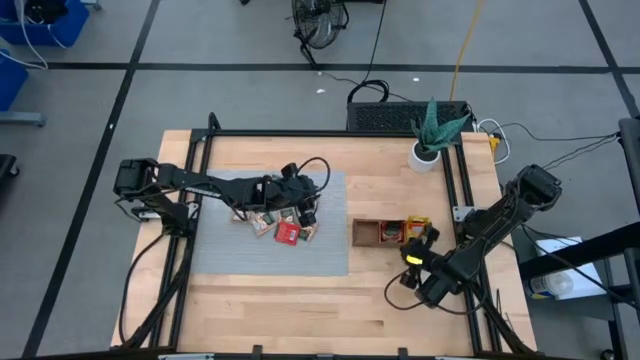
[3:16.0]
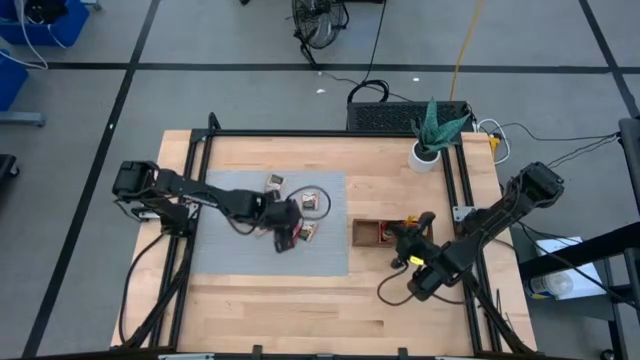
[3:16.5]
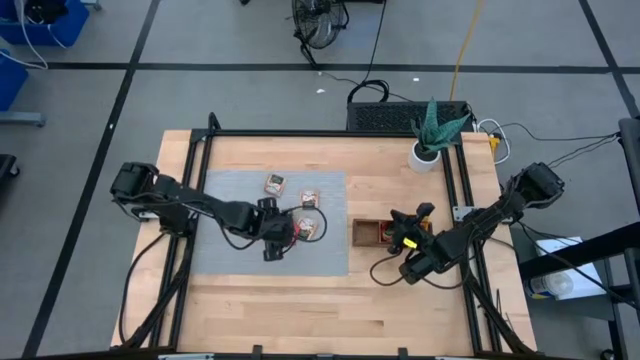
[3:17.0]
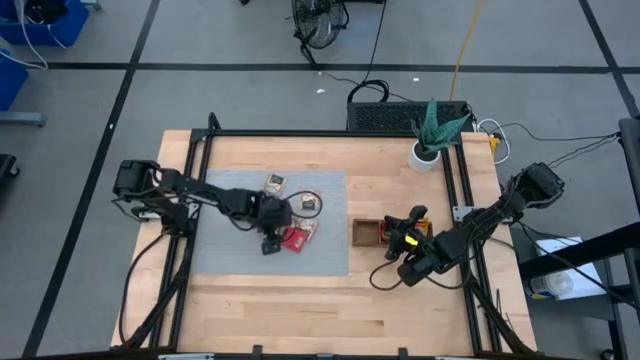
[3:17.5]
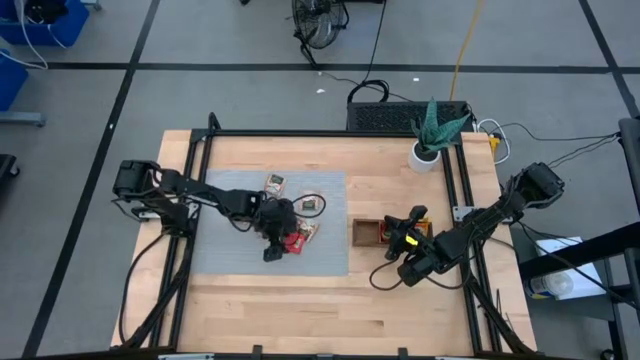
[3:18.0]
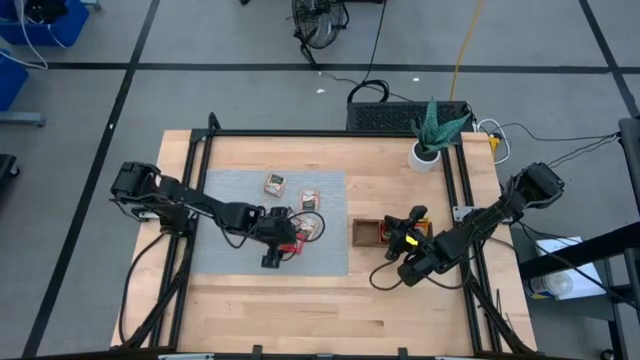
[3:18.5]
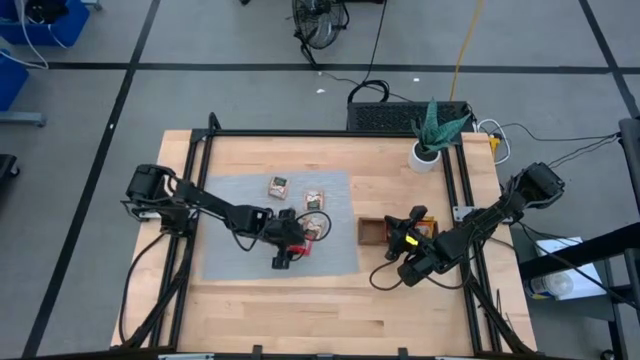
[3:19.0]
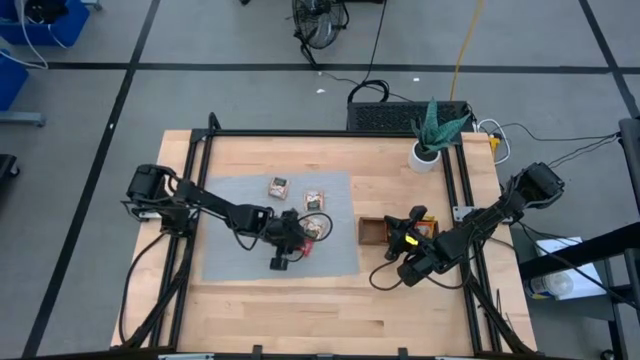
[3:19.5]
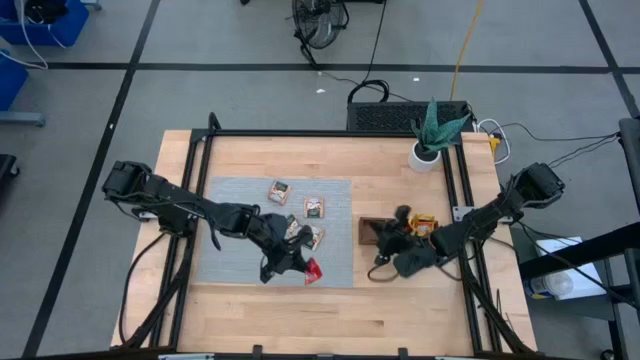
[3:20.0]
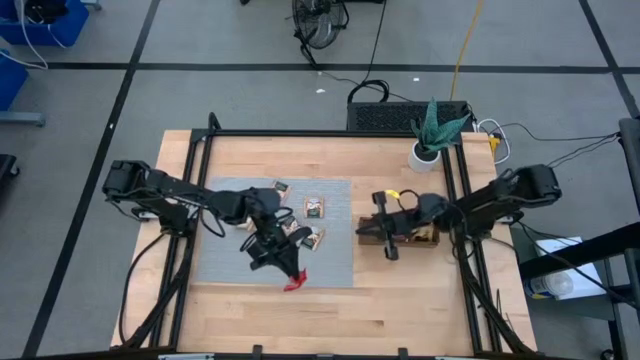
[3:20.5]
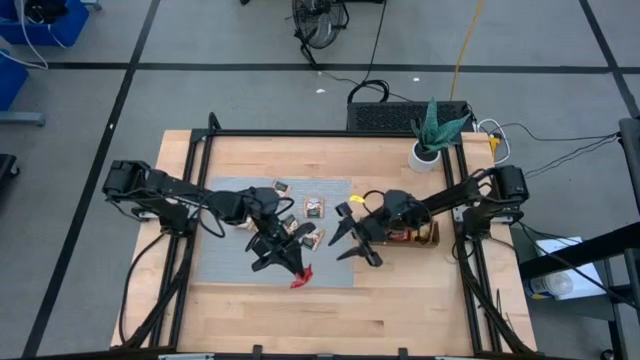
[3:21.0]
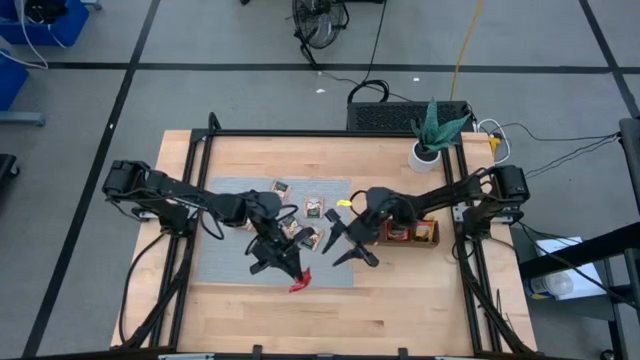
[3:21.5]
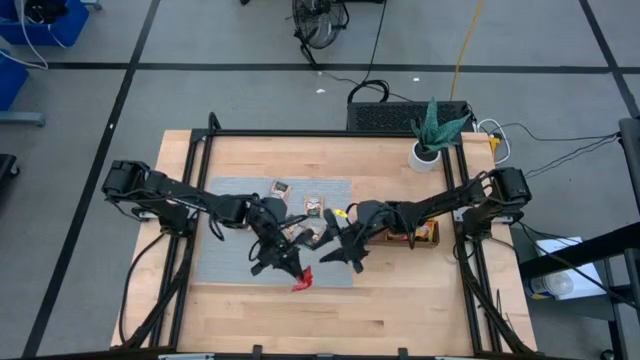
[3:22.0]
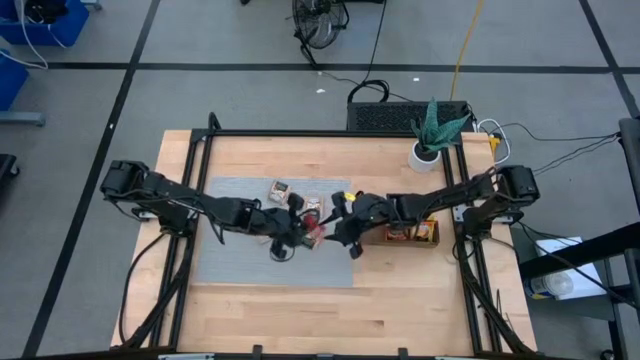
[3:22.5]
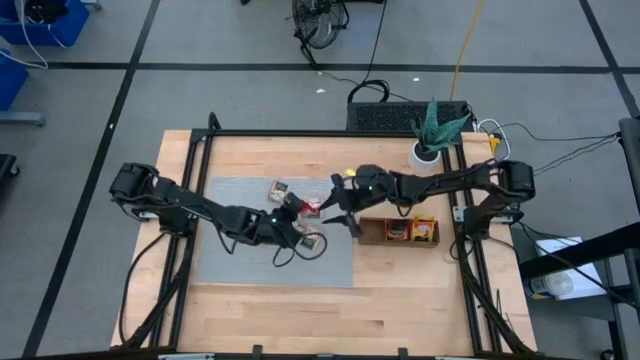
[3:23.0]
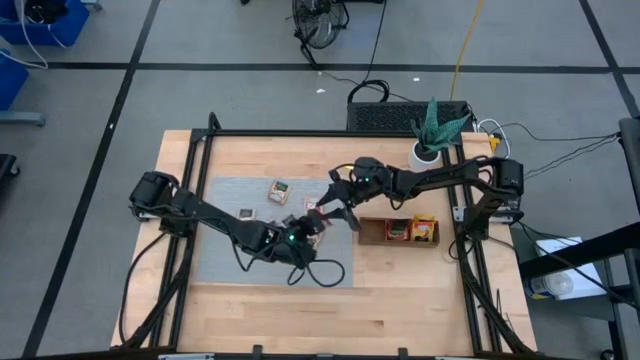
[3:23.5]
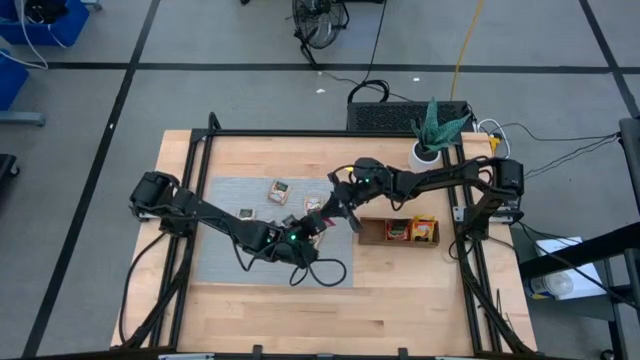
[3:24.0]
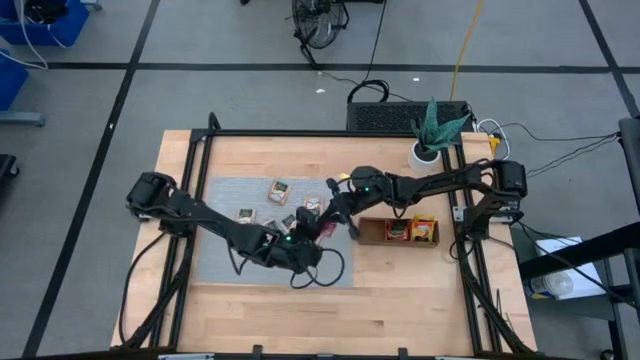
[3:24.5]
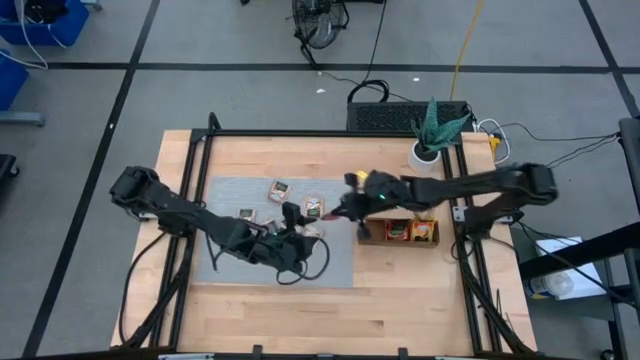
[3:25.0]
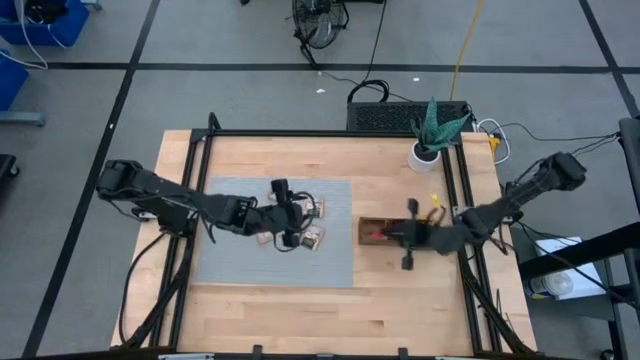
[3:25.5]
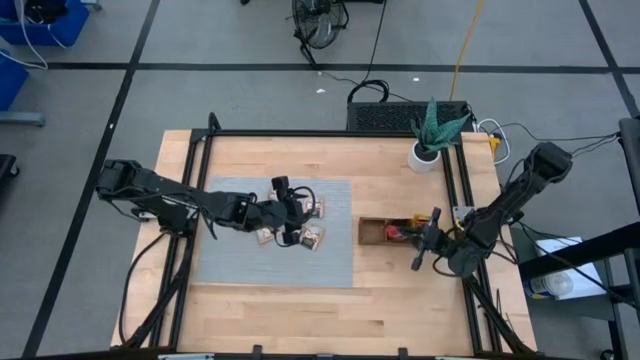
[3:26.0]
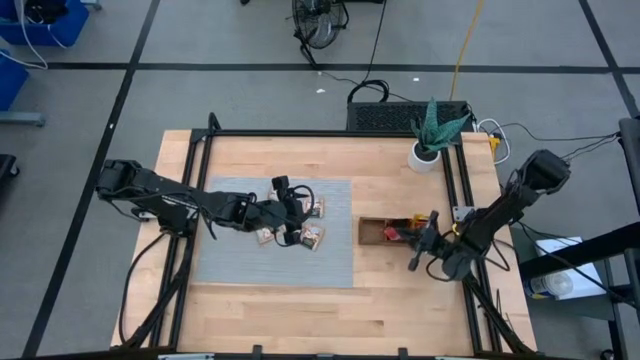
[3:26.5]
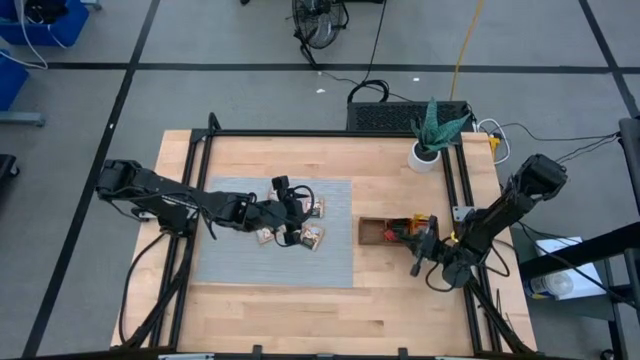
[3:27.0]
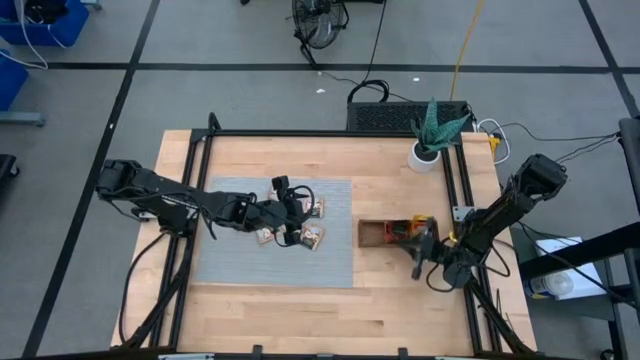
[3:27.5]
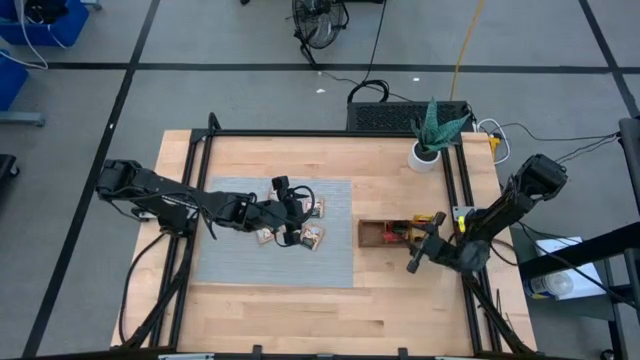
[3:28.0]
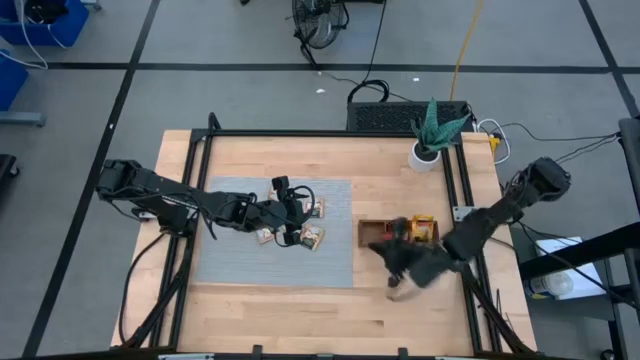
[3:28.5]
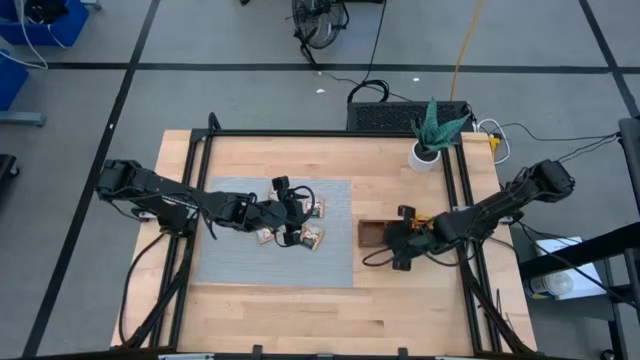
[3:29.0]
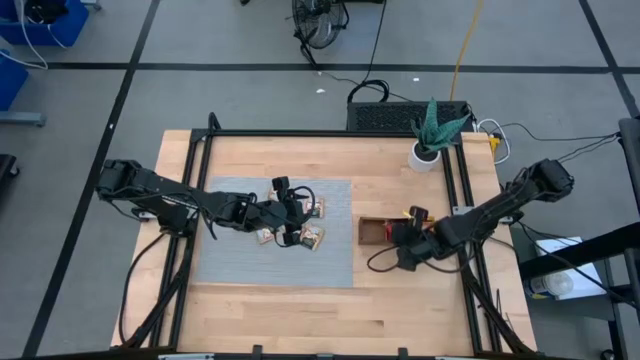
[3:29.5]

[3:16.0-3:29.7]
Task: Pick & Place Tea
Put the red tea bag into the middle section of the wooden organizer

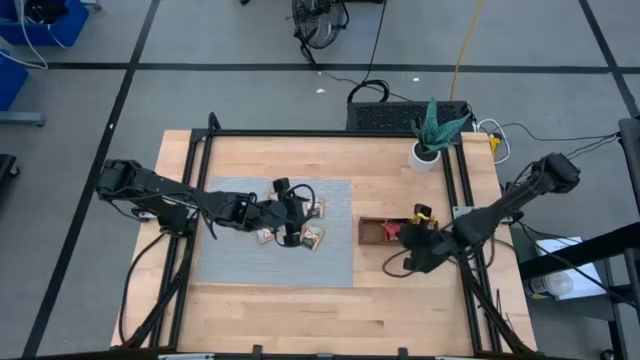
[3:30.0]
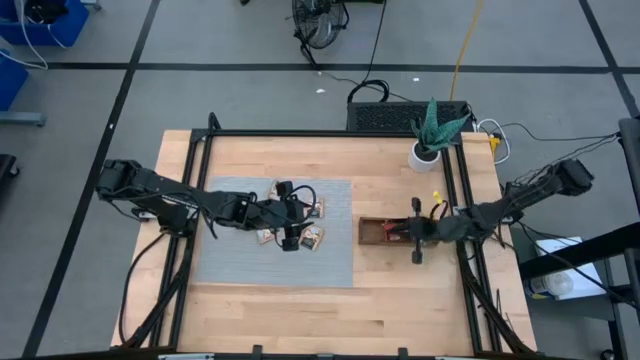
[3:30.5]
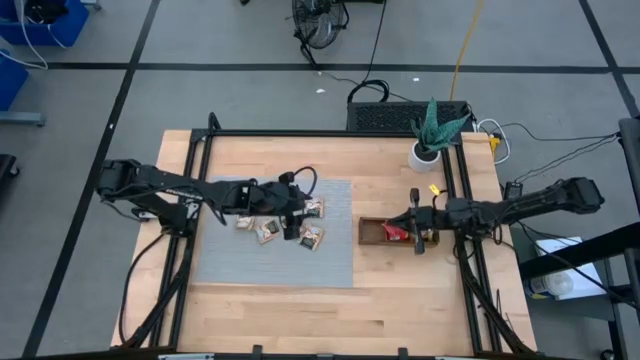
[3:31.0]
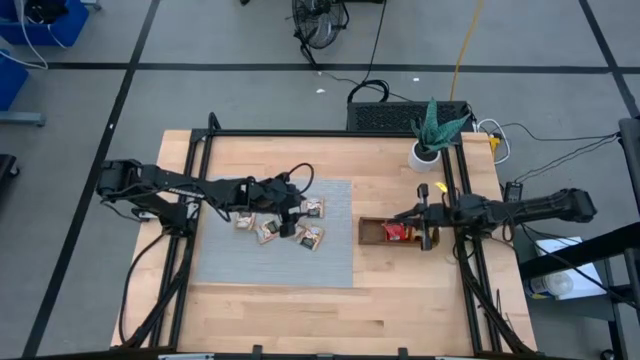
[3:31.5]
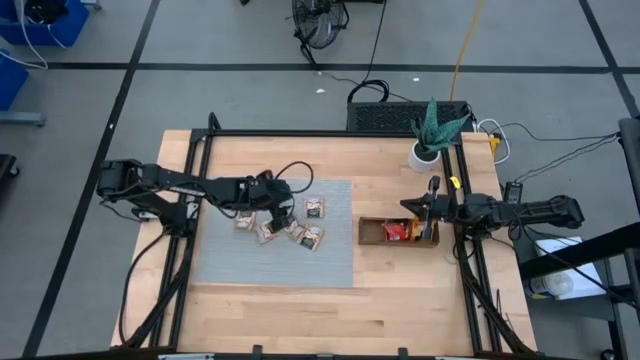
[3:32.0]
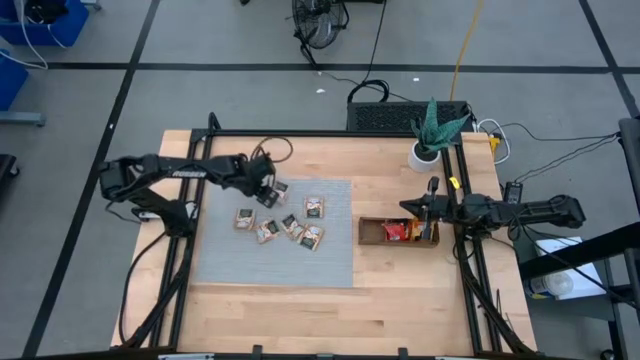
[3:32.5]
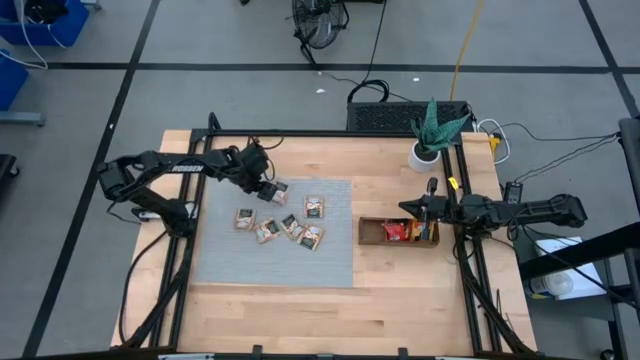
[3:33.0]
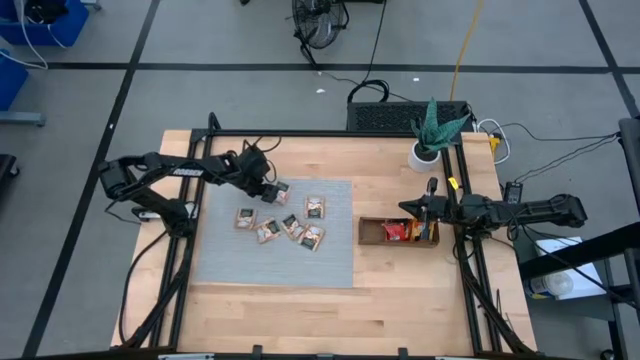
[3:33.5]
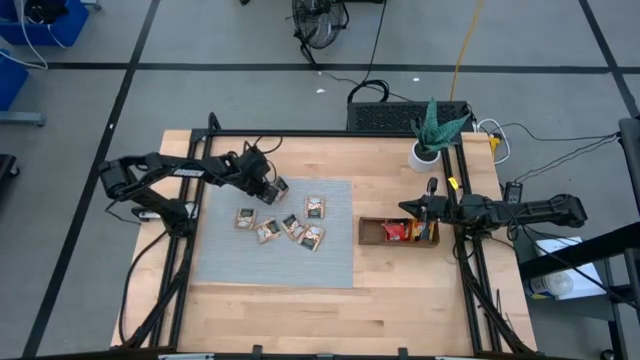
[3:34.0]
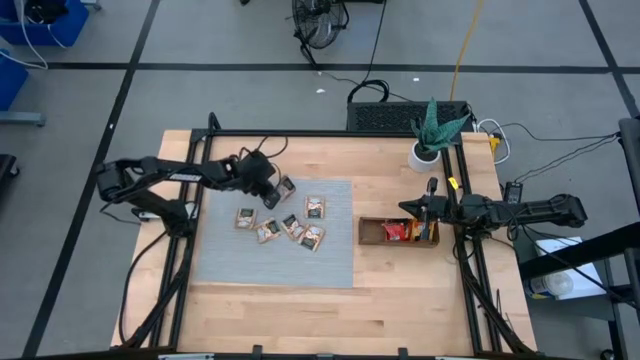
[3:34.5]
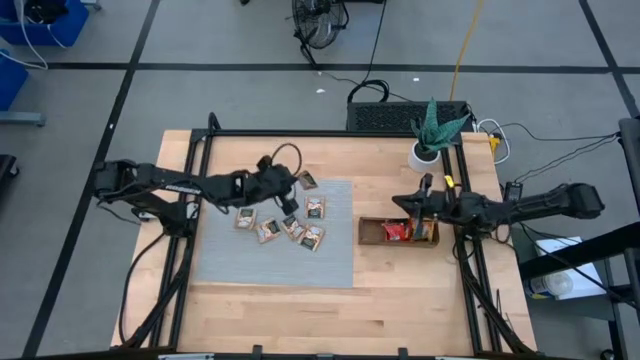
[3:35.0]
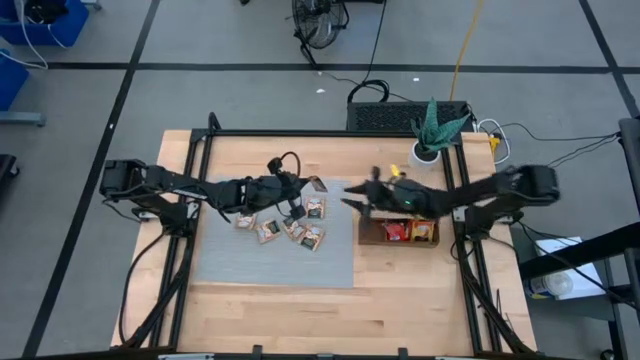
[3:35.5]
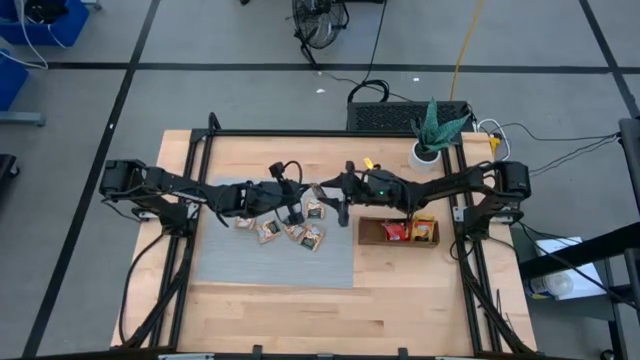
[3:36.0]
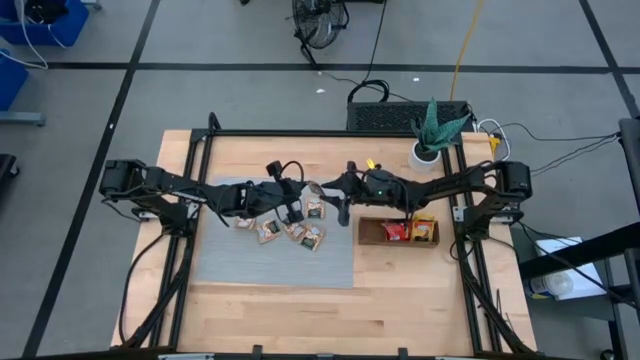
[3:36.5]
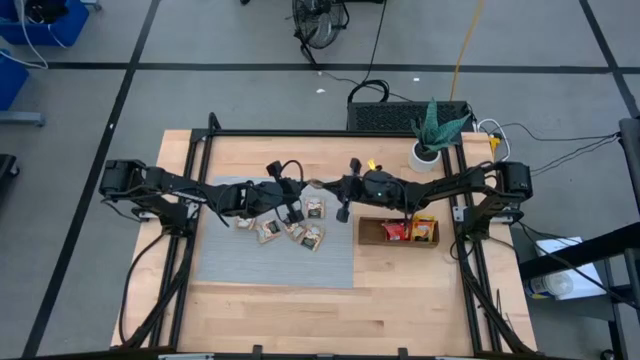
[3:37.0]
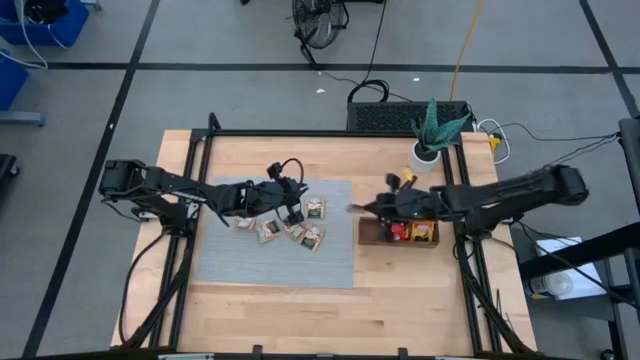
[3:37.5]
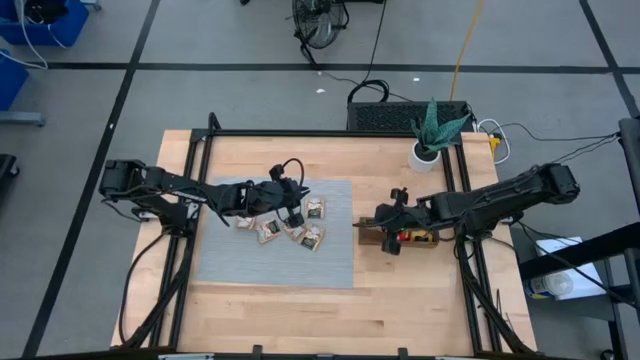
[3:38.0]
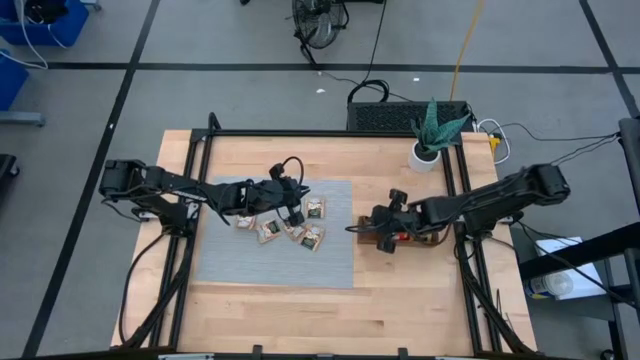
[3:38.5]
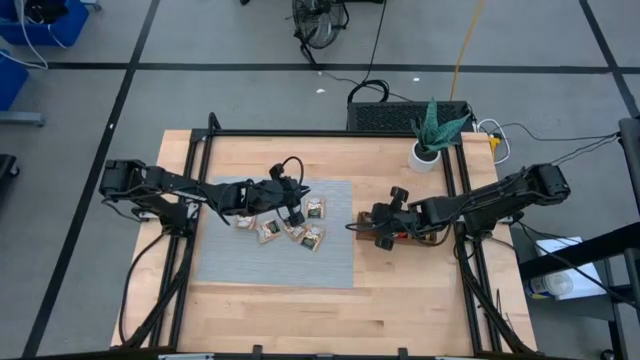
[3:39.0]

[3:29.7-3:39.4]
Put the brown tea bag into the left section of the wooden organizer
